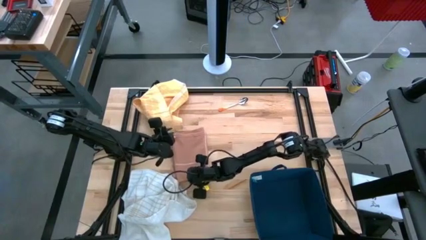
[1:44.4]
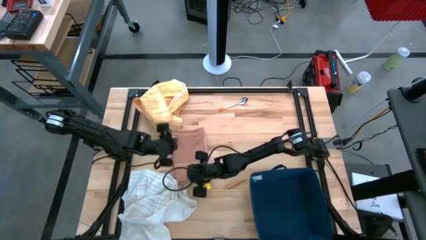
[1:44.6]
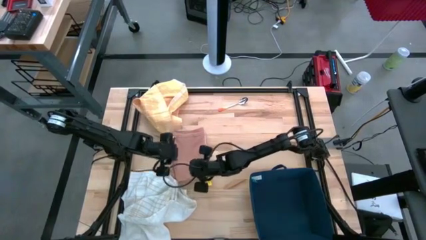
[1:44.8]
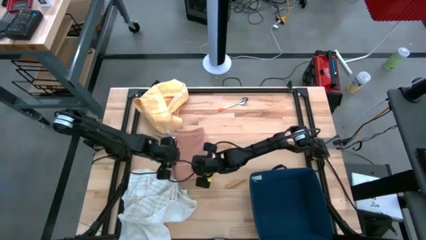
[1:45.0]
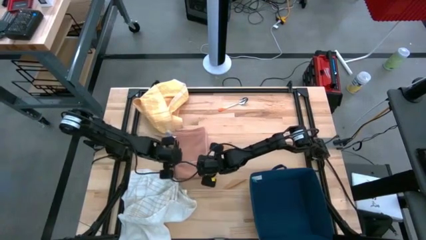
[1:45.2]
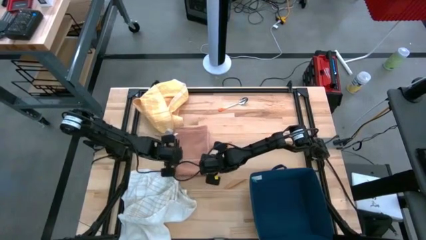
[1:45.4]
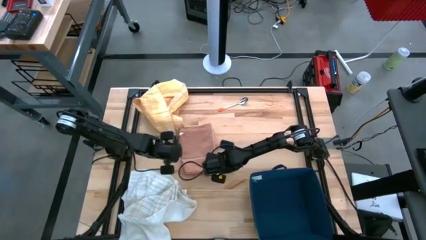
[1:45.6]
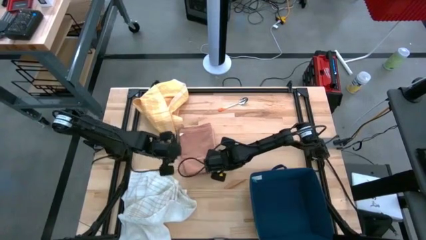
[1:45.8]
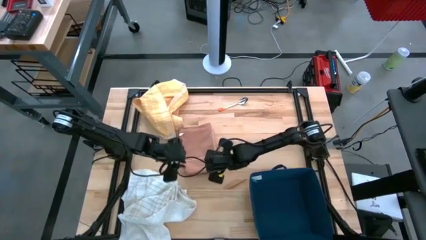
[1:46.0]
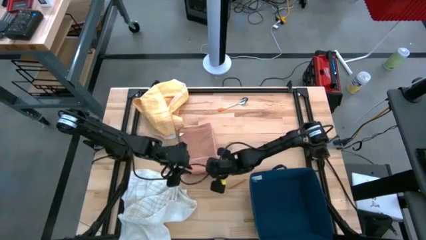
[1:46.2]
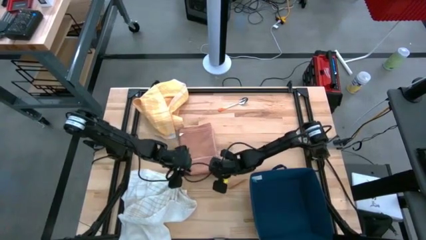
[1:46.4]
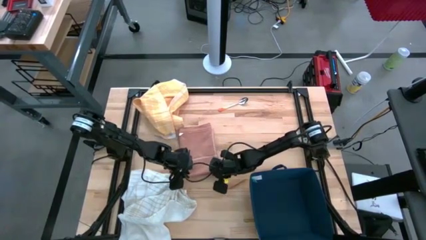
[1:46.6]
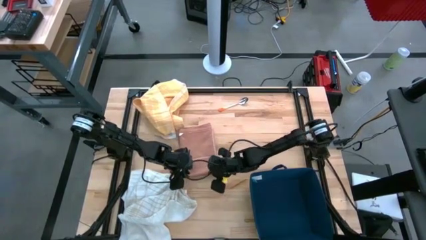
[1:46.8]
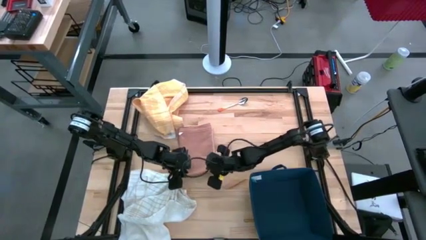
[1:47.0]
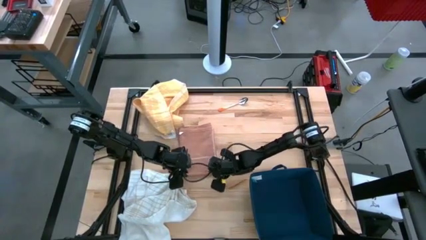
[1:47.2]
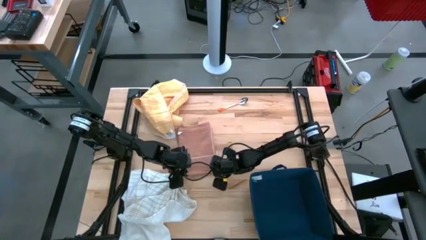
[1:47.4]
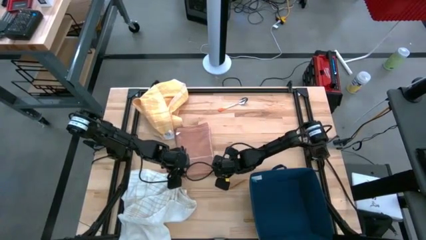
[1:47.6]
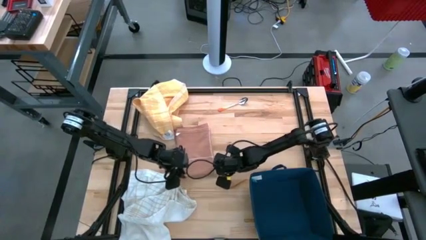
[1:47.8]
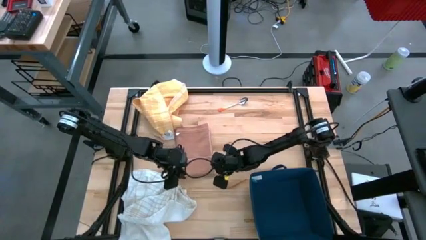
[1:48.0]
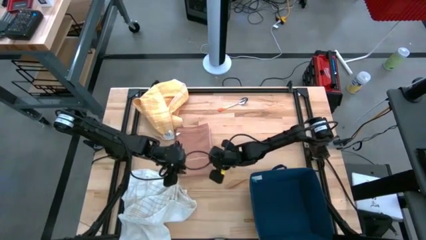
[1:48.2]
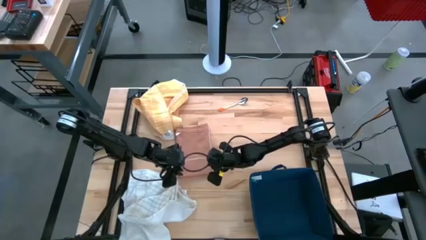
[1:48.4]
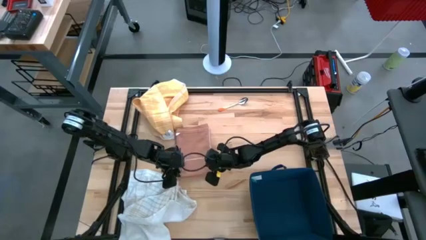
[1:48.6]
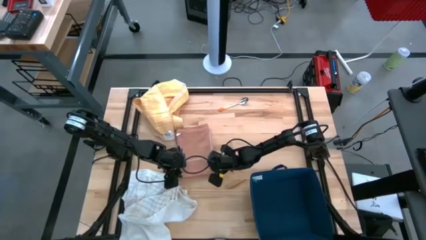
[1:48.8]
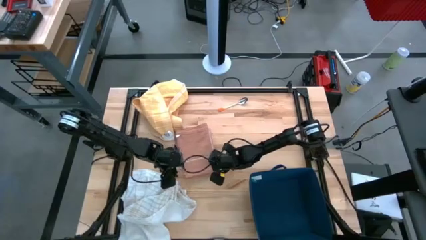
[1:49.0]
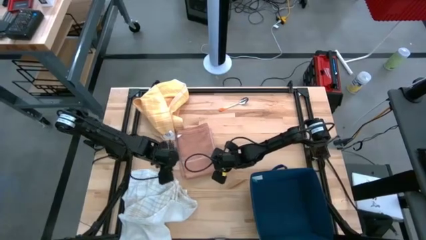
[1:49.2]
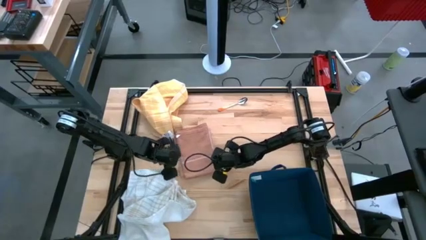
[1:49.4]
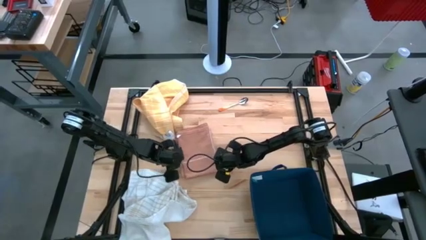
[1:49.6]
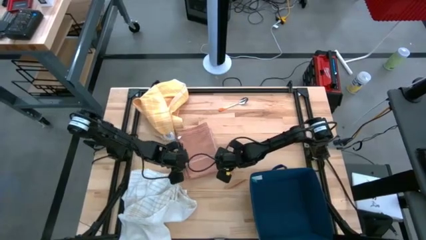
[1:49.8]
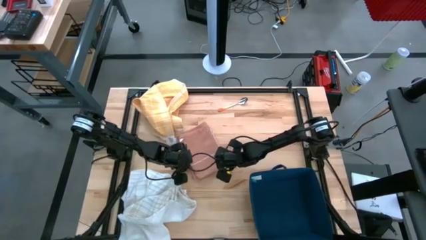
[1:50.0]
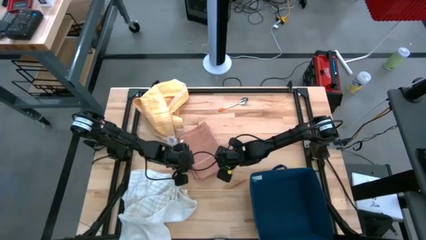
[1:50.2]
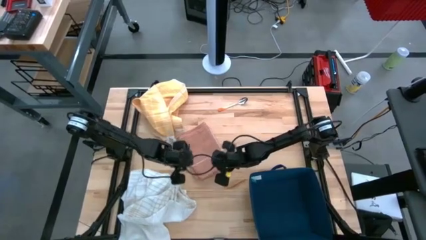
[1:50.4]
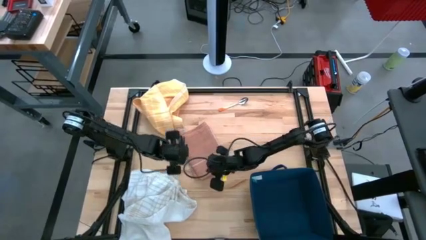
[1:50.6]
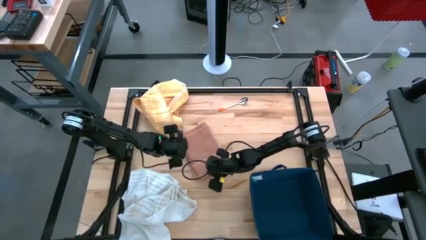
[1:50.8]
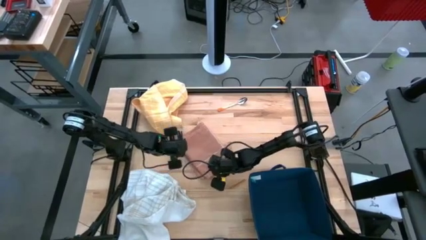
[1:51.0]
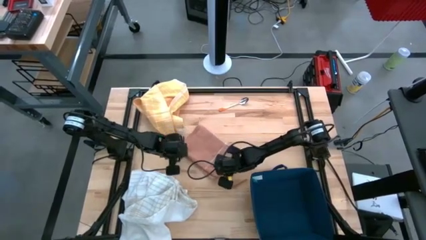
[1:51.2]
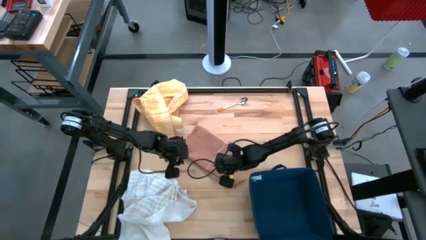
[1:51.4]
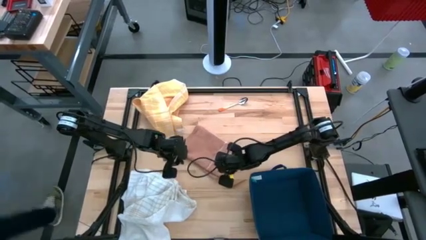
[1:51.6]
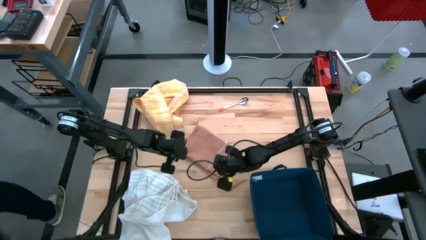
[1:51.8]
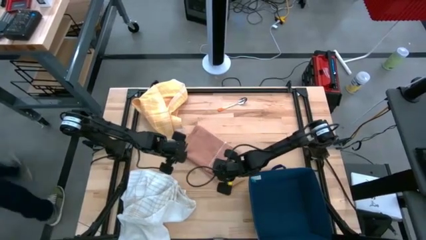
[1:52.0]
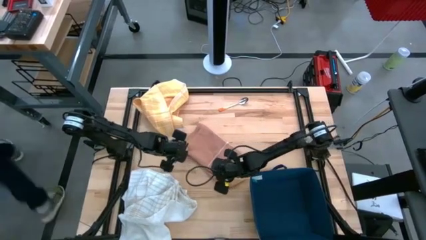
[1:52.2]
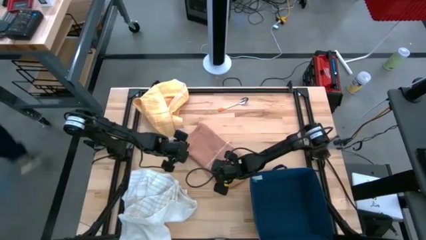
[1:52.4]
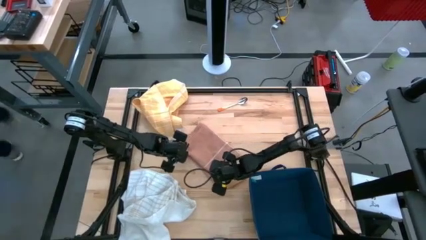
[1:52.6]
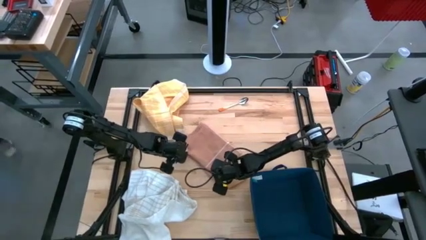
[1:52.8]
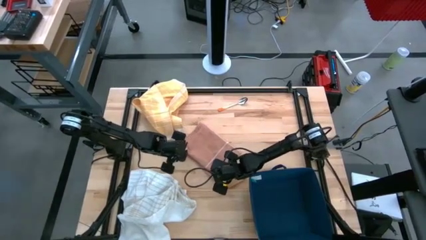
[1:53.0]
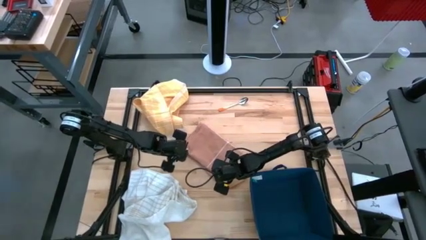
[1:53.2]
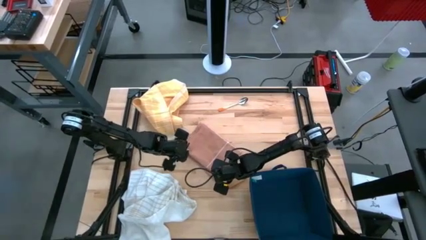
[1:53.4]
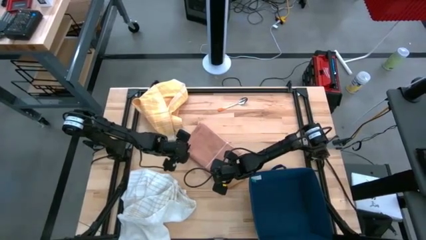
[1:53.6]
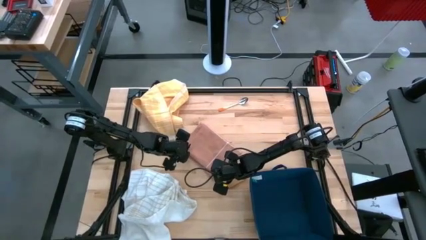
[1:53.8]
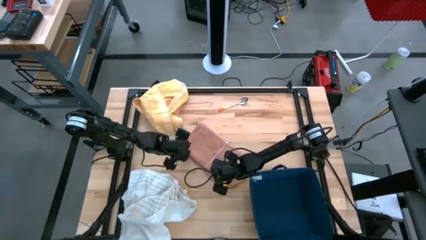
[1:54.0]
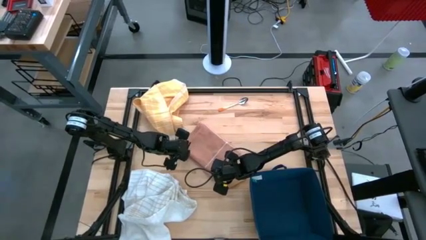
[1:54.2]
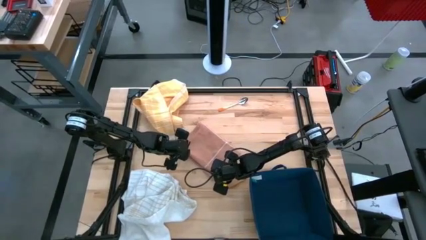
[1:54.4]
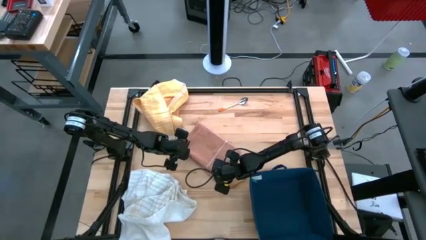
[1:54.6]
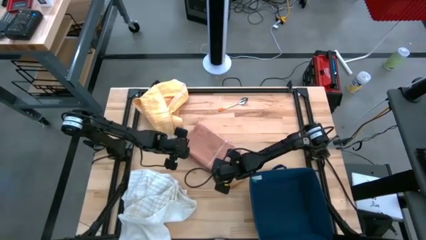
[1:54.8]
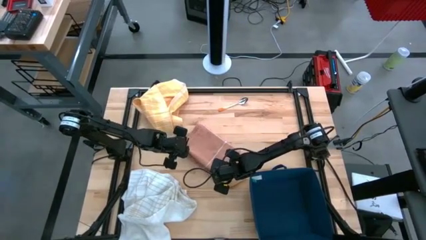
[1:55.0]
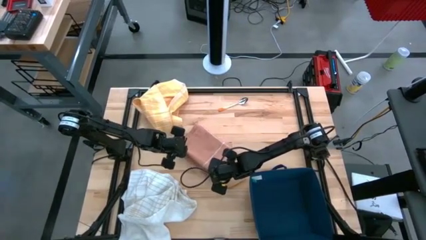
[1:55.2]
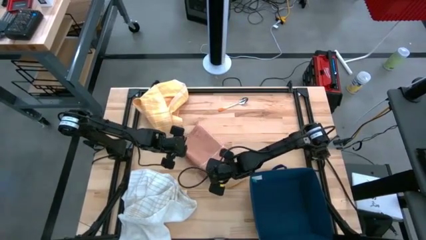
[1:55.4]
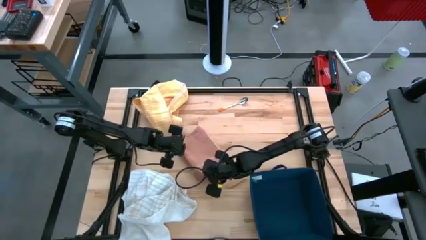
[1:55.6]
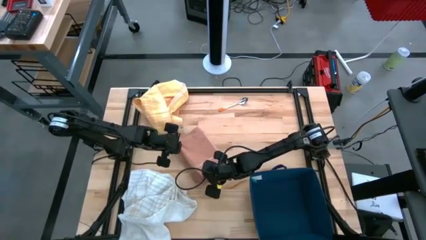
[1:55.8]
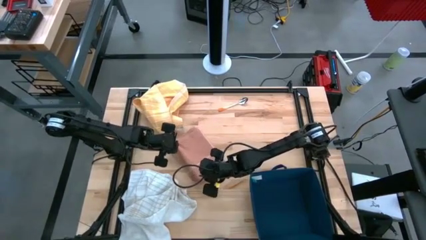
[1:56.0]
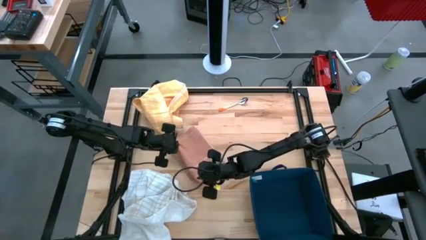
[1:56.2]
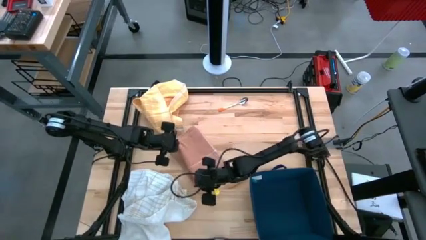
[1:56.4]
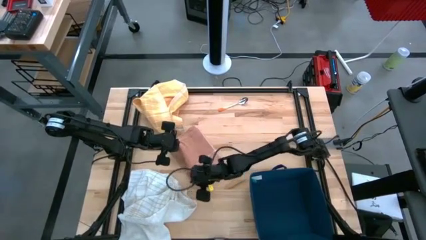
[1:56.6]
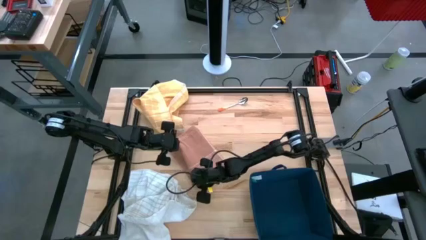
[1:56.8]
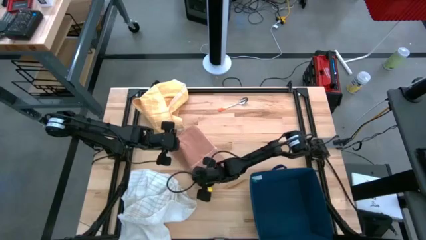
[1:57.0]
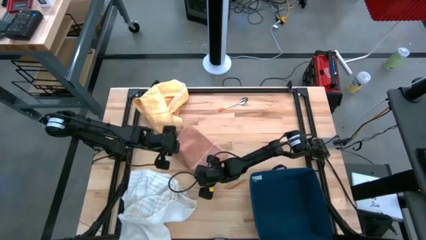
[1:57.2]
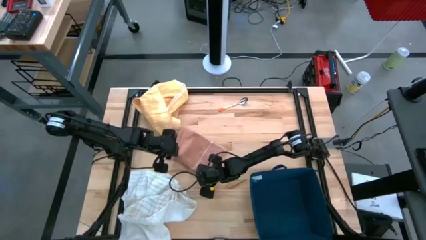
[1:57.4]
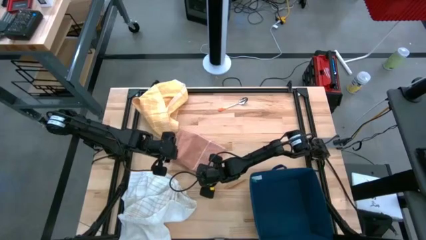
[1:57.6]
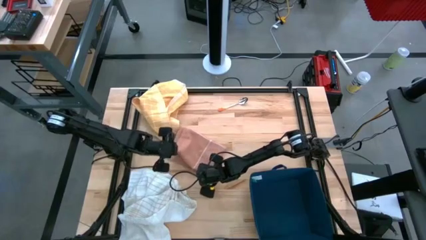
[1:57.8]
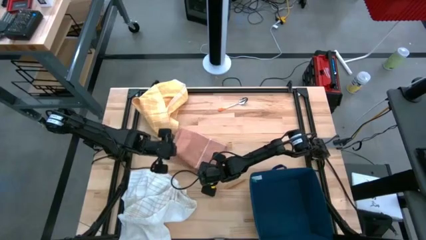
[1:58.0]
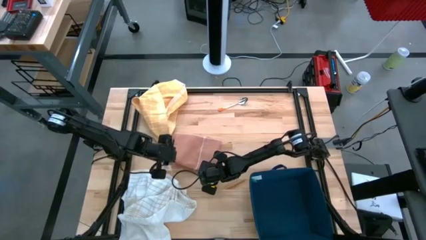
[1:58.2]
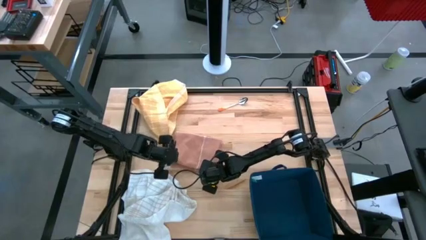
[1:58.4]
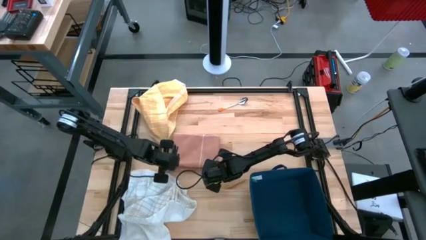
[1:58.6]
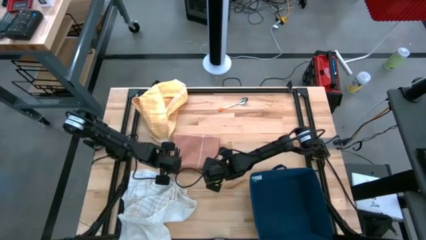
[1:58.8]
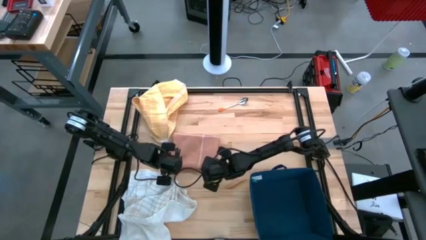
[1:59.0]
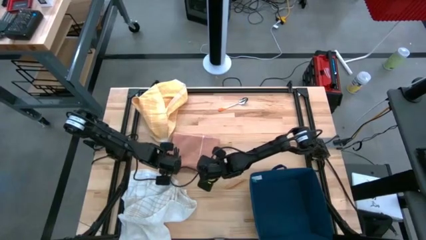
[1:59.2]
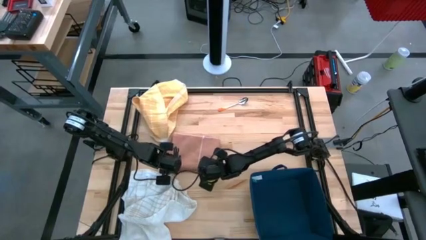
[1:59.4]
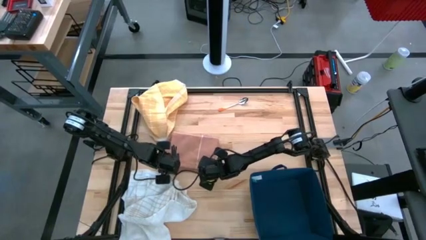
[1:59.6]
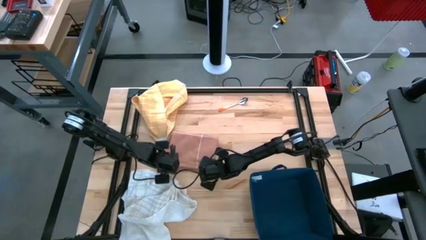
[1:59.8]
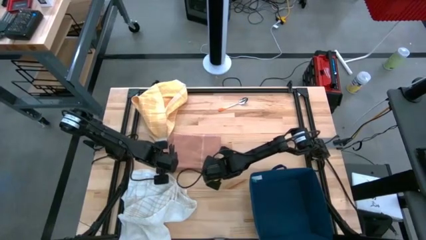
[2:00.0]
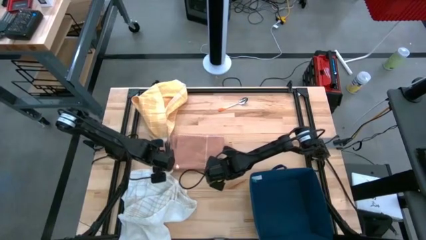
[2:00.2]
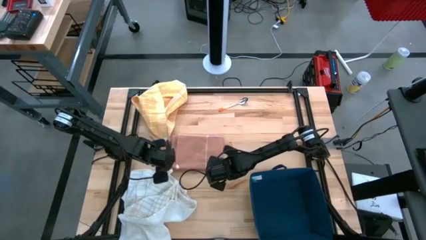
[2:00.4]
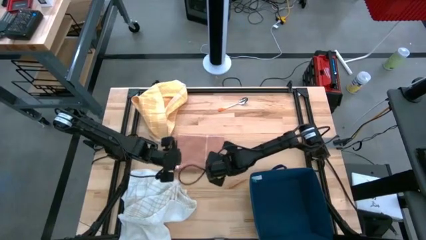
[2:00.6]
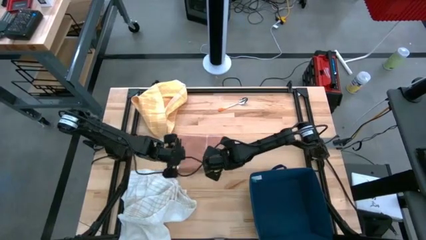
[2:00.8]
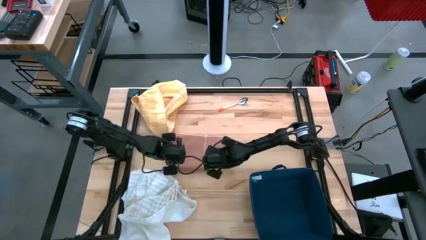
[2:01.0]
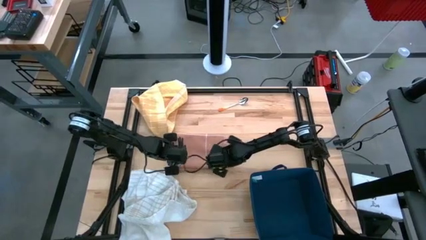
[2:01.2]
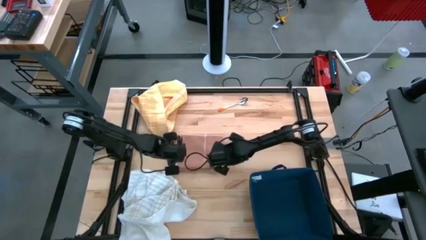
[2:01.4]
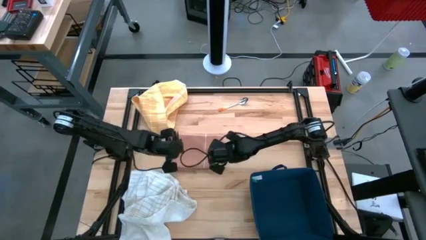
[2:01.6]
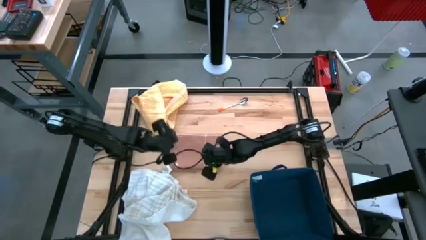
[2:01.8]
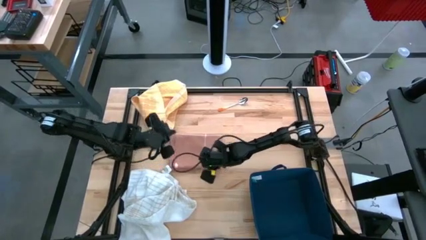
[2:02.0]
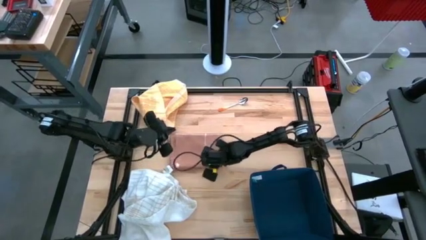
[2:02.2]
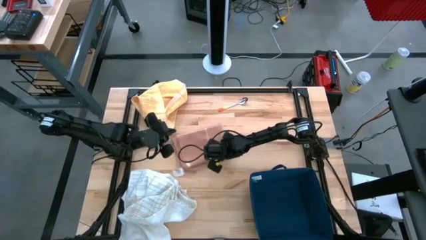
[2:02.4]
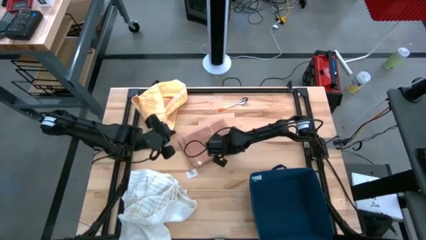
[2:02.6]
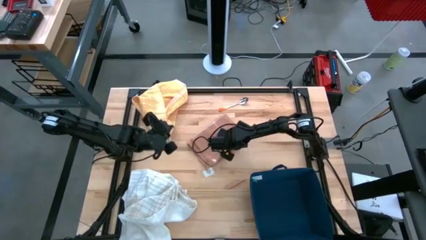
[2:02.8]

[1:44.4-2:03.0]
Task: Fold towel
Fold the brown towel
